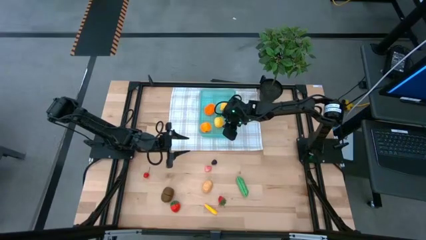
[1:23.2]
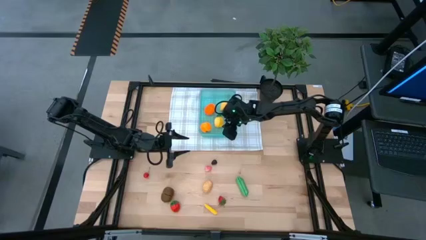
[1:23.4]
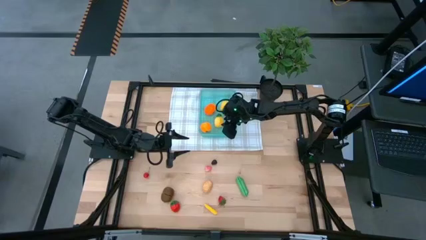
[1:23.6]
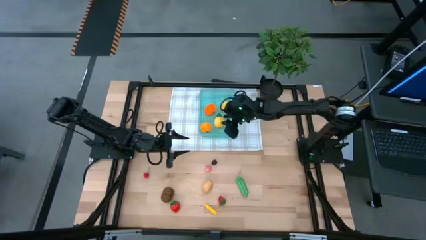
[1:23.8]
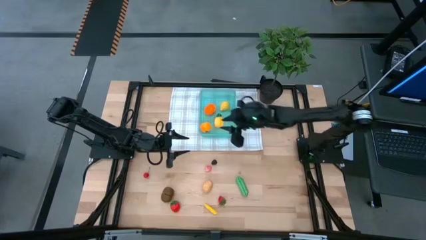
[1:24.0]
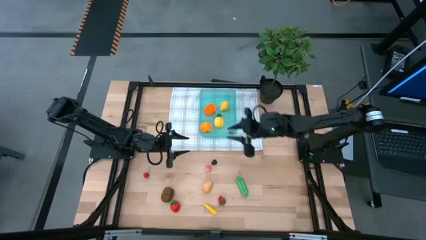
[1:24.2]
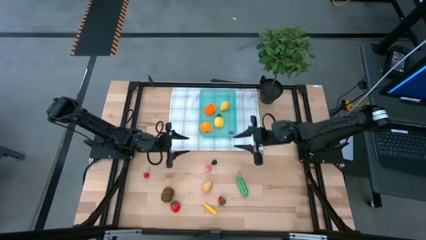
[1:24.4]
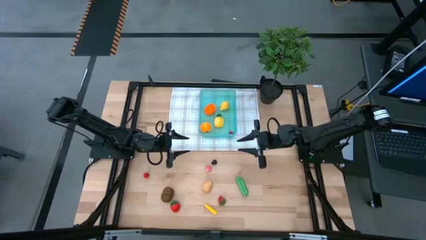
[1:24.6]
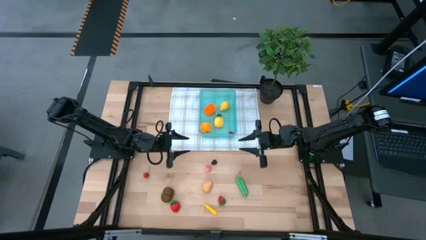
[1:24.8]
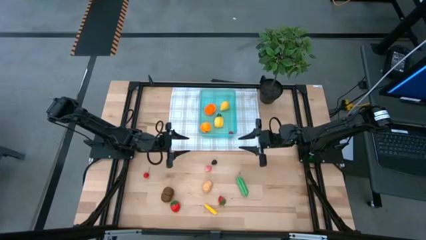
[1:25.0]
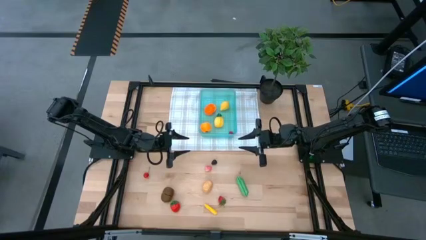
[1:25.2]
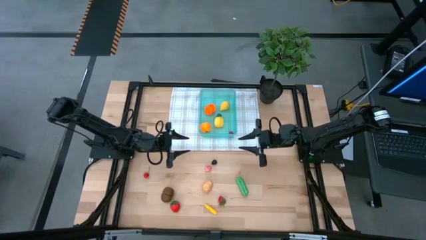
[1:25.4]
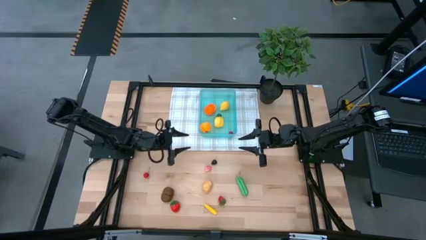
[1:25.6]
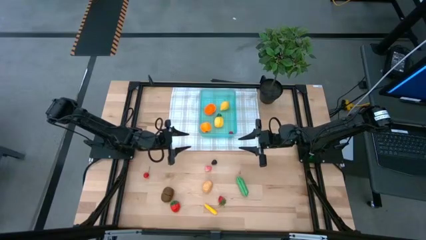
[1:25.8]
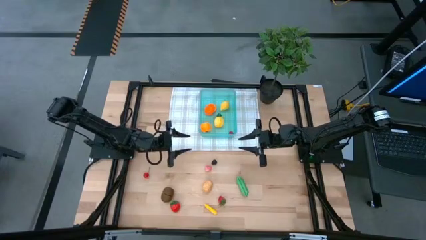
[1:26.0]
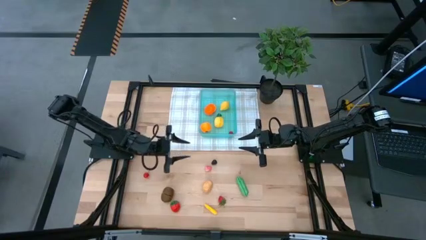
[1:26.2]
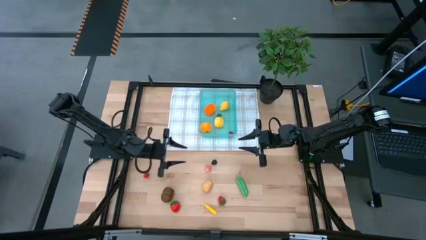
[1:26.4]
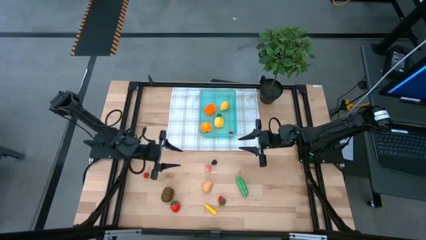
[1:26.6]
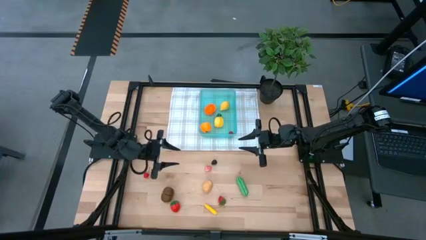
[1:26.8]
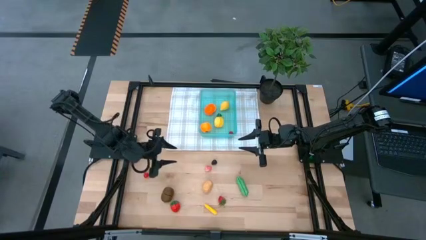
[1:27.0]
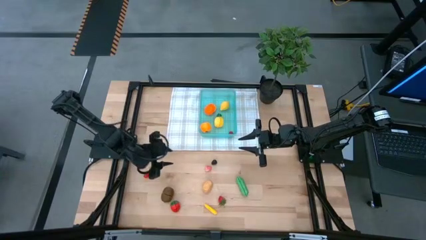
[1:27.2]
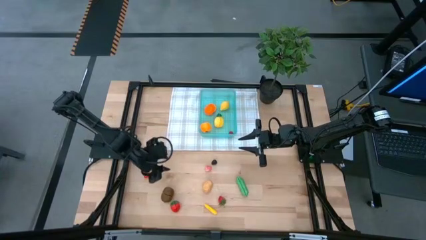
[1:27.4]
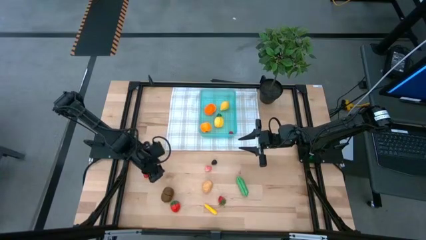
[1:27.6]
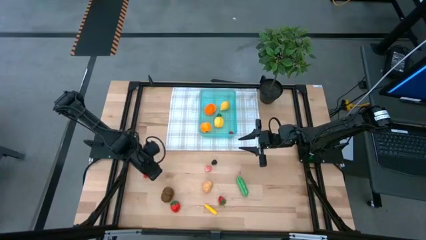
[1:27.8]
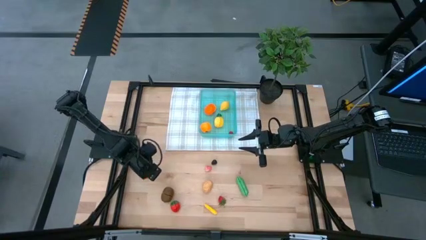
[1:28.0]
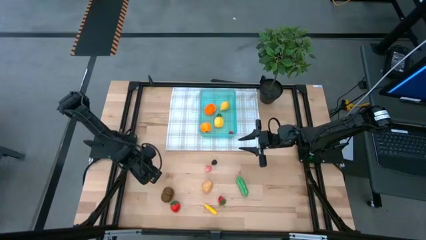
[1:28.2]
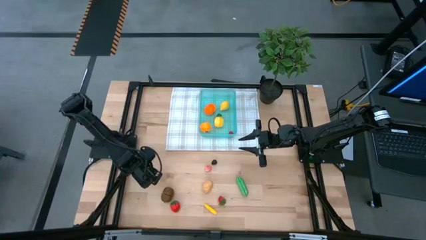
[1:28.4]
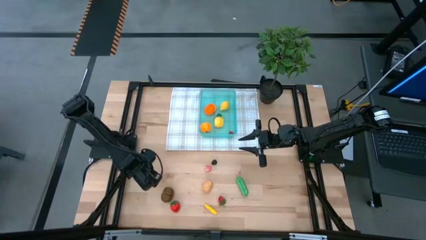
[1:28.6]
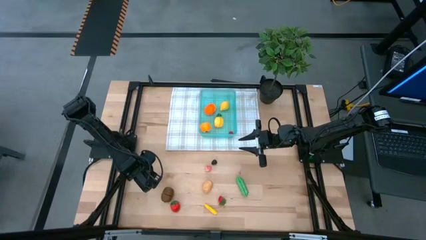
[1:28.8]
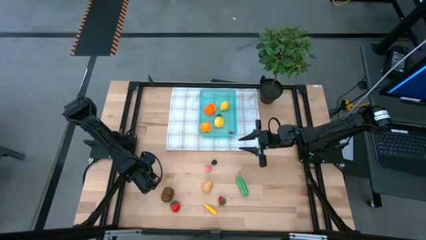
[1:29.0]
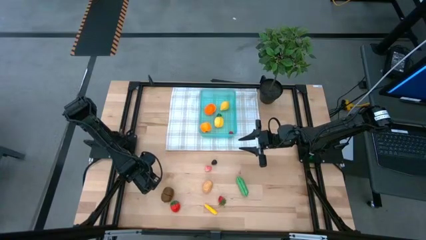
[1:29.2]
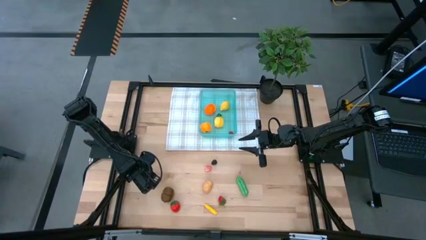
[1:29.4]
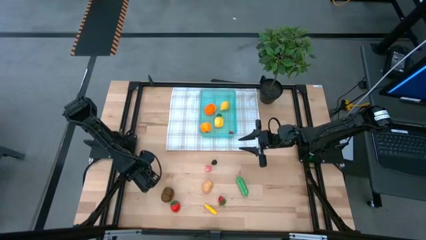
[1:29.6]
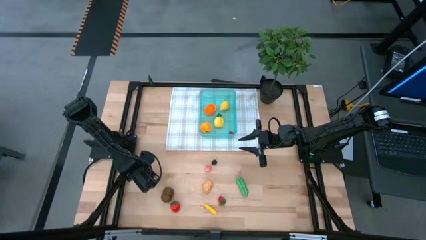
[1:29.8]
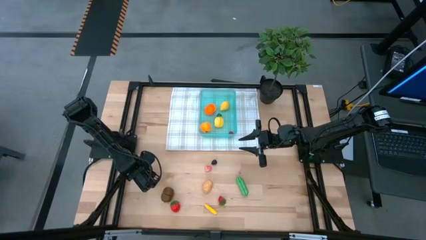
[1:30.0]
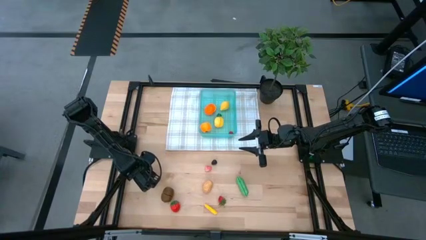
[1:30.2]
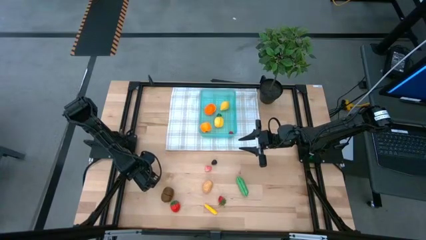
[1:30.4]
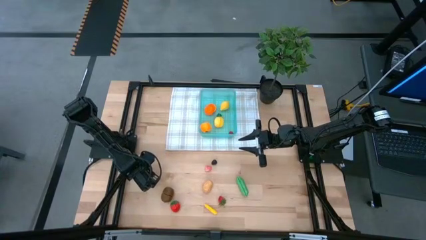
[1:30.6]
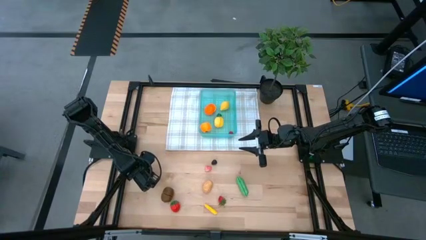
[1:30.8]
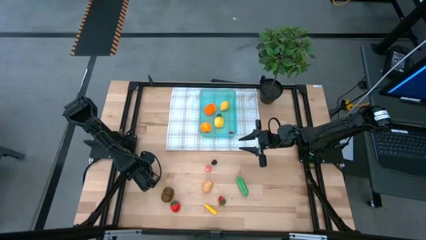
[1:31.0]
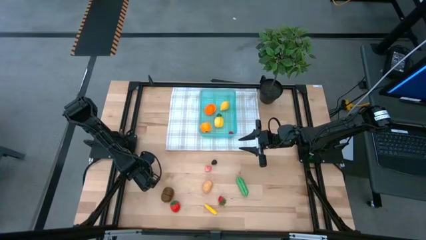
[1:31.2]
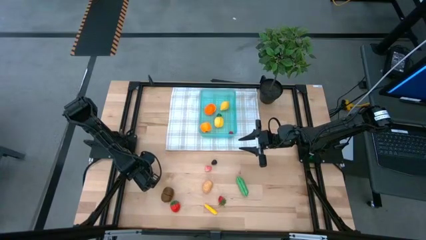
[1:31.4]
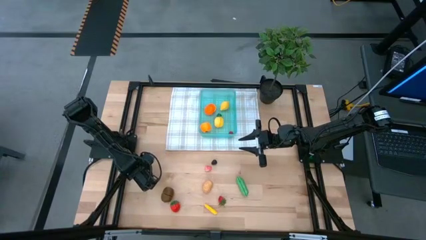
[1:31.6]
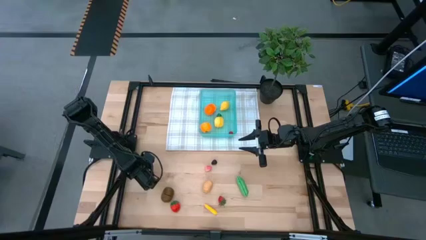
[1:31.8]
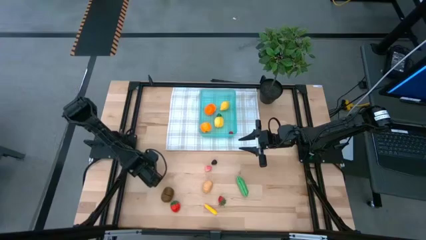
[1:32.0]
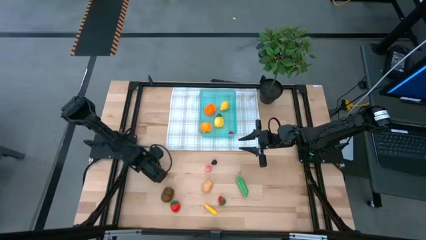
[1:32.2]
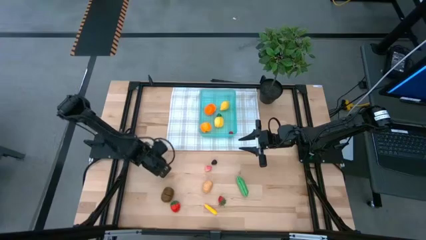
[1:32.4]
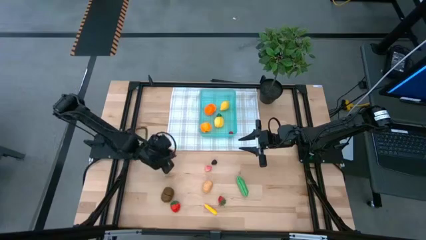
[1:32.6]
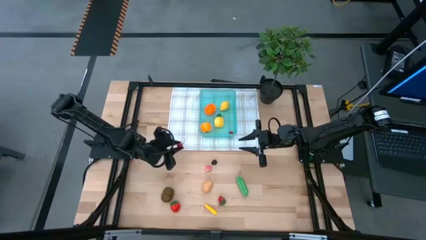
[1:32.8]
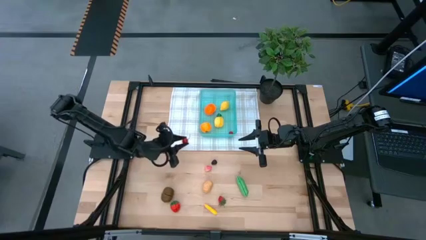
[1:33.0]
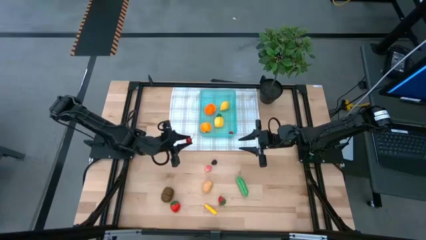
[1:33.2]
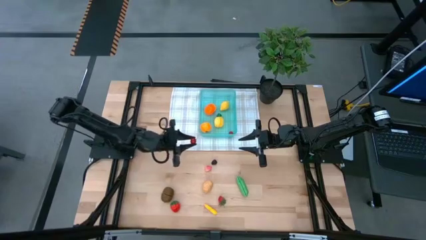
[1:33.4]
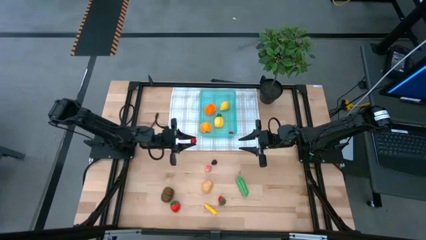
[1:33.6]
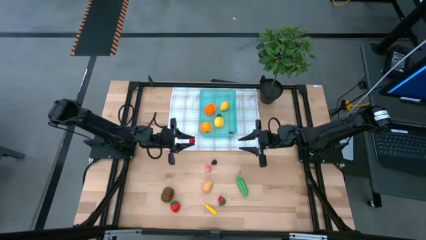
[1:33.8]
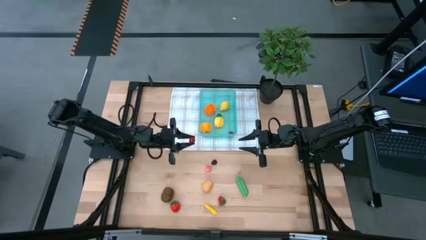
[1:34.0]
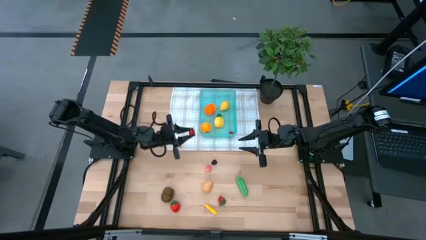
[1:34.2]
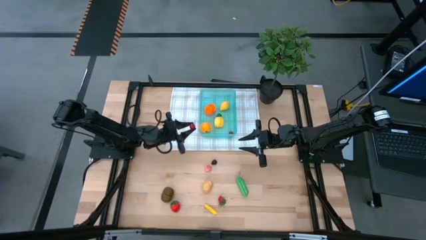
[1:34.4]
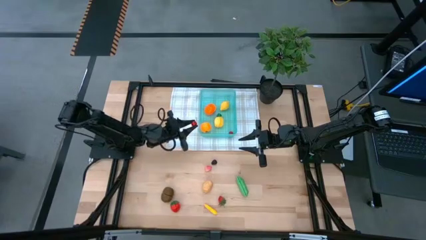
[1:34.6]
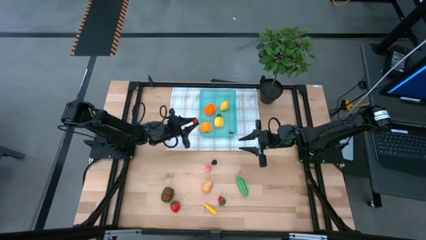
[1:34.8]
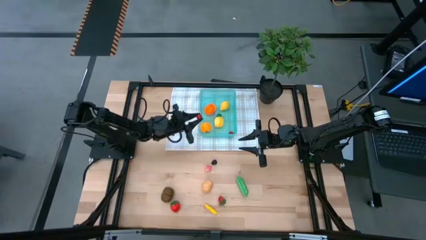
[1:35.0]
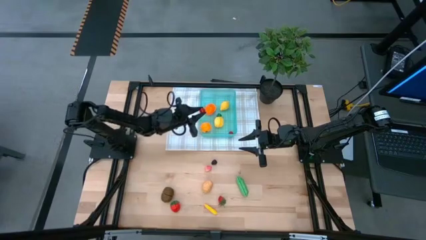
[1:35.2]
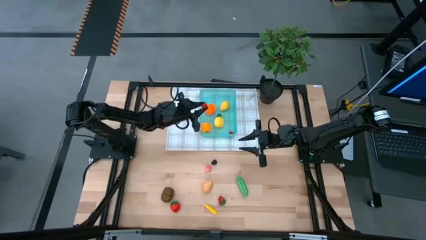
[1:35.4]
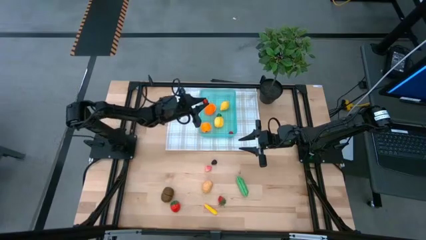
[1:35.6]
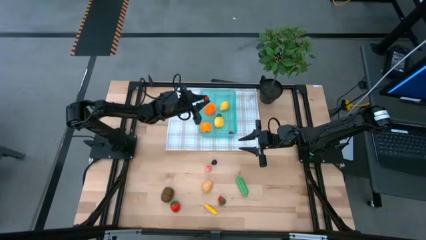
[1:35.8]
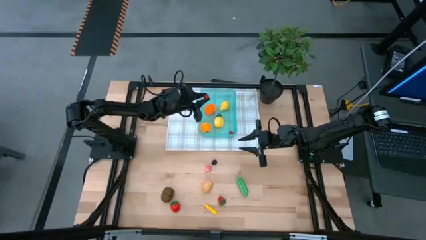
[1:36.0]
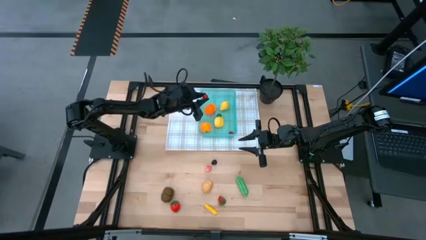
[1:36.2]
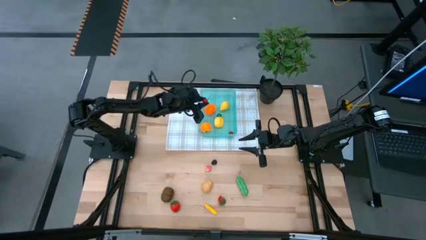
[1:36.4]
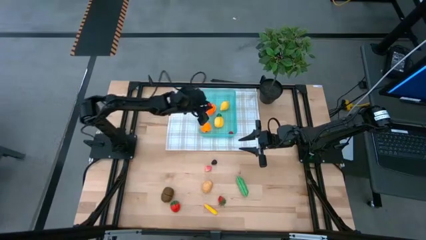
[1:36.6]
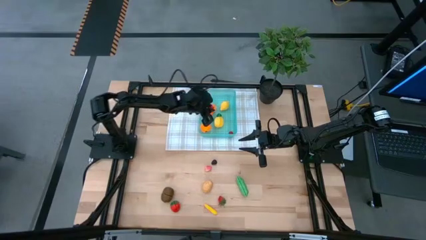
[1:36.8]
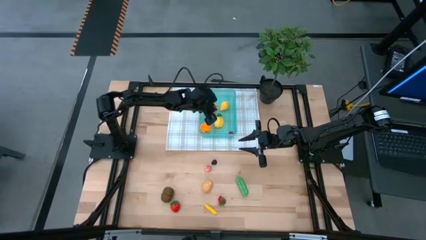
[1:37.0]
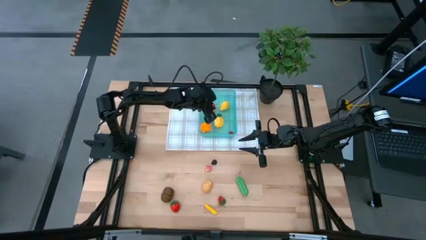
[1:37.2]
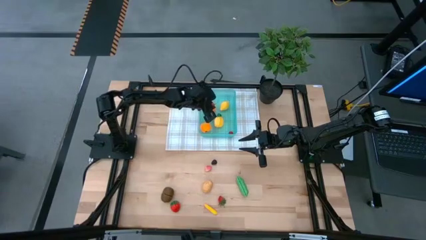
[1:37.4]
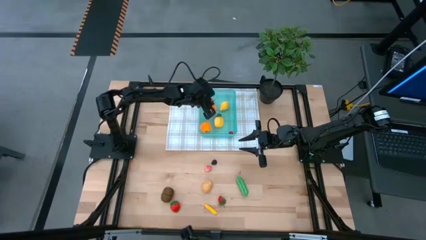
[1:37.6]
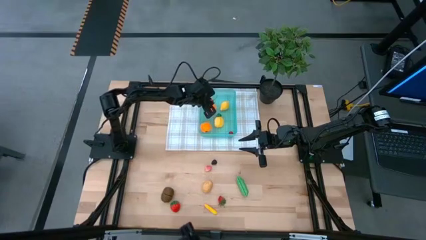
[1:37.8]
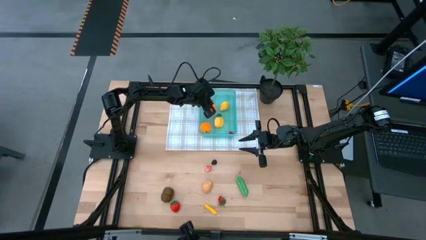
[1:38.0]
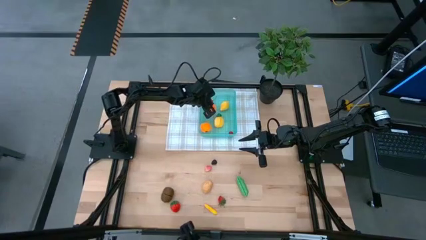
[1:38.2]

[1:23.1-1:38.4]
Task: Pick and placing Produce into tupperware
Put the red cherry into the green bin
